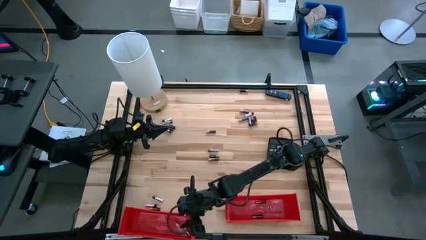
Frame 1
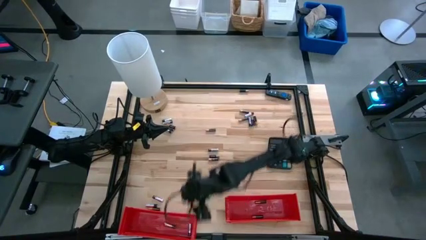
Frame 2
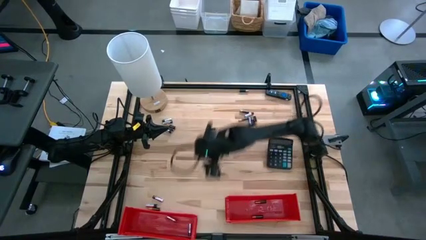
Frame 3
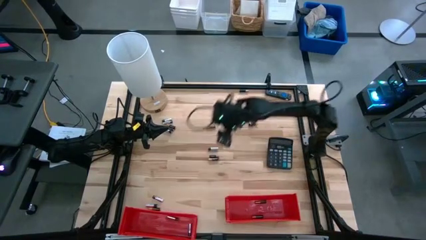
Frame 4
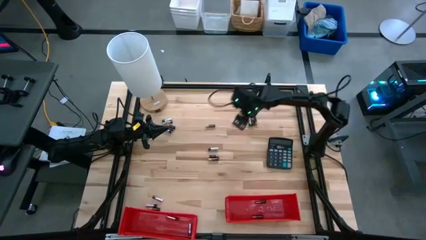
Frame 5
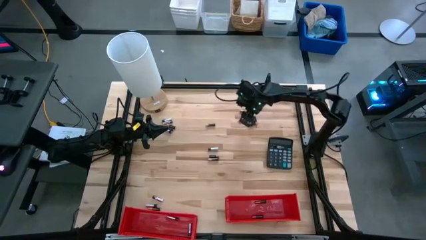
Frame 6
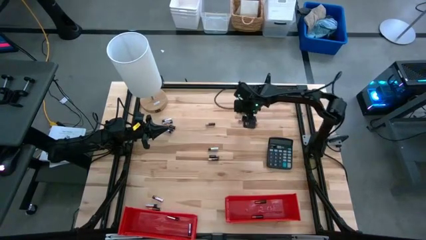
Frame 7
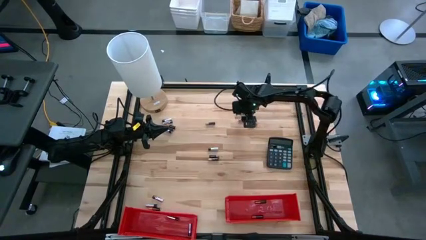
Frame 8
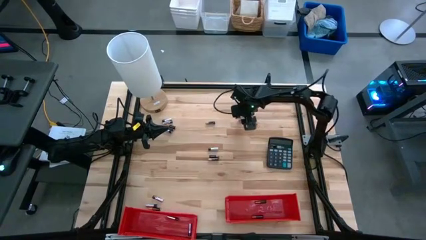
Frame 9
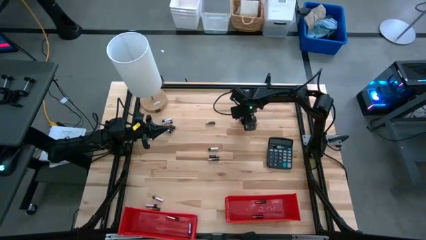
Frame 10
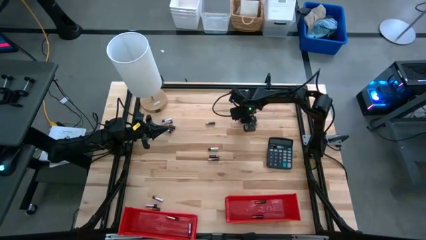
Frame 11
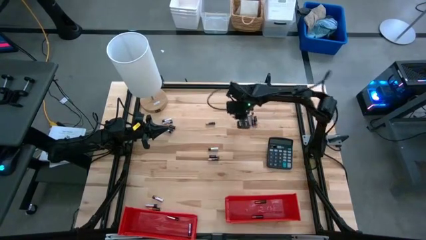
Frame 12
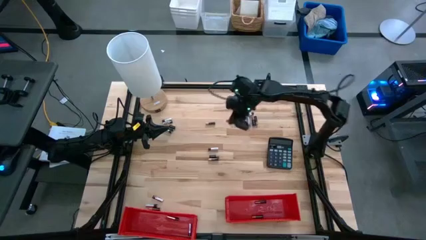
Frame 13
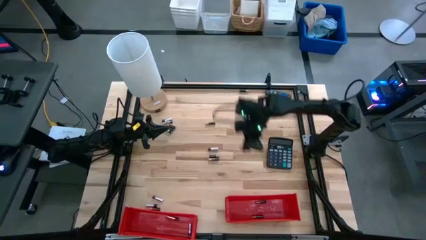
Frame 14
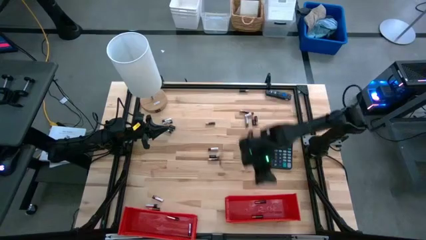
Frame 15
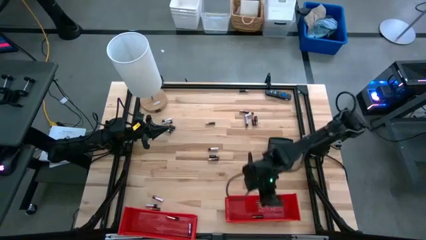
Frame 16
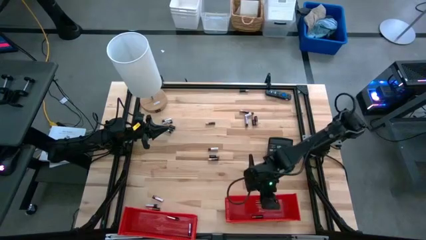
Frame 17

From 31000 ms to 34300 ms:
Task: Sort batteries
Put the black-brown battery into the right red bin

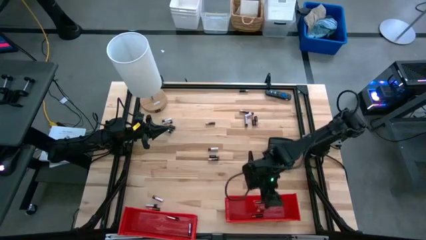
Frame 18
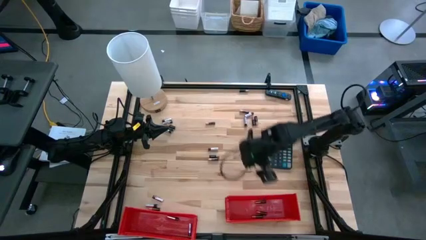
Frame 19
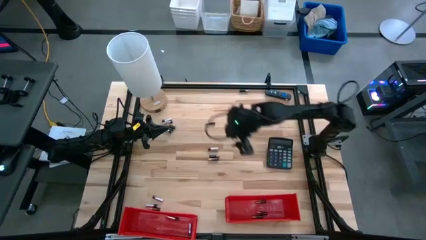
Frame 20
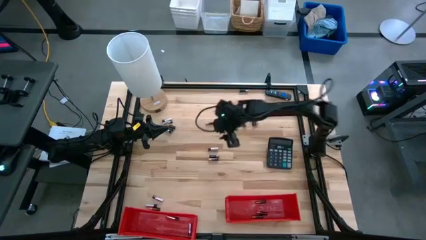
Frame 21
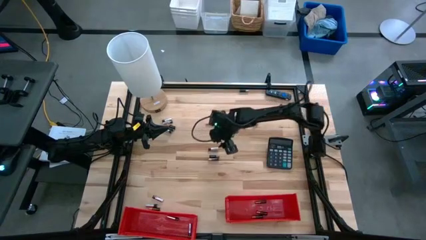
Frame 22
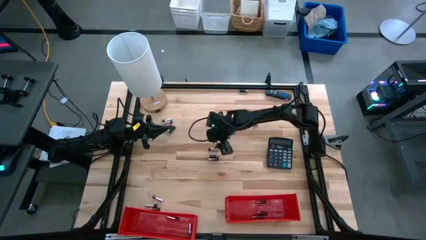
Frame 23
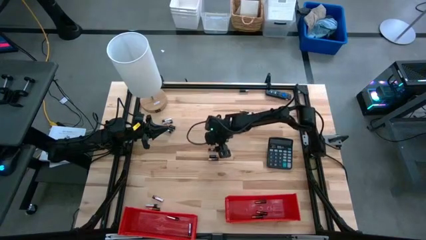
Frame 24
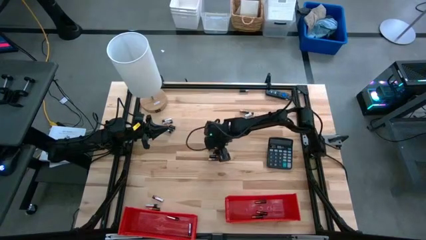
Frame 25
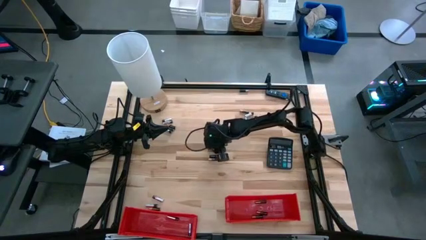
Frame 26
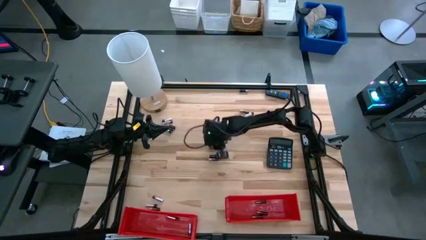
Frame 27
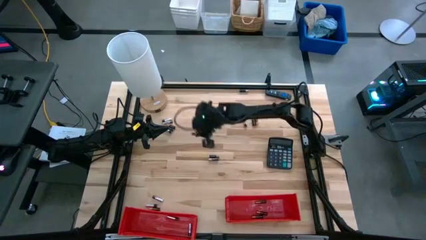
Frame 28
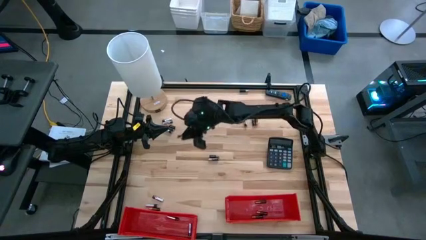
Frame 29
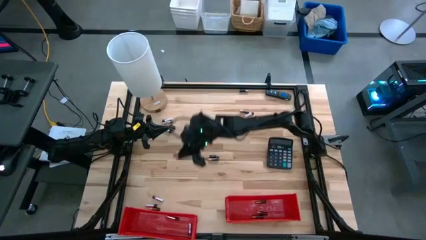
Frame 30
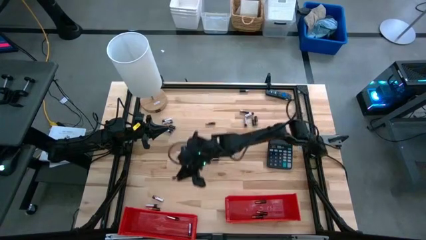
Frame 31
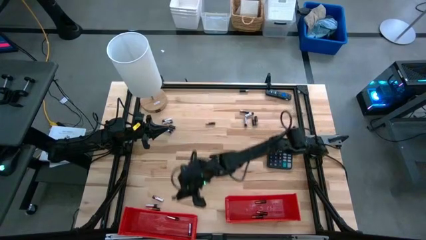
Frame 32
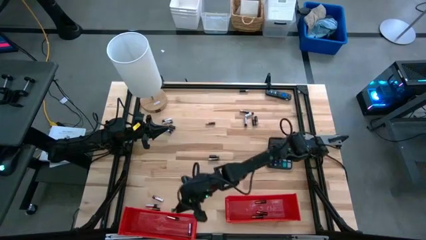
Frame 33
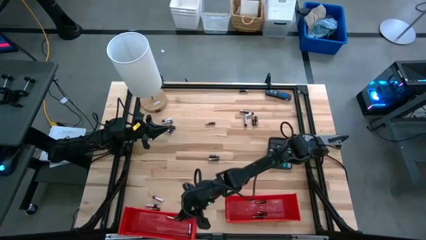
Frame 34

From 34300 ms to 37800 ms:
Put the silver battery into the left red bin

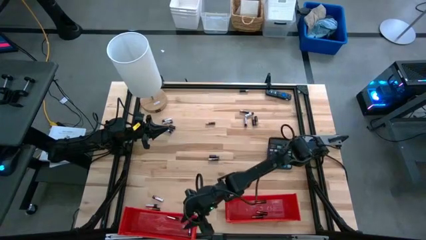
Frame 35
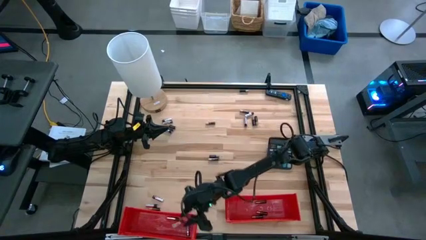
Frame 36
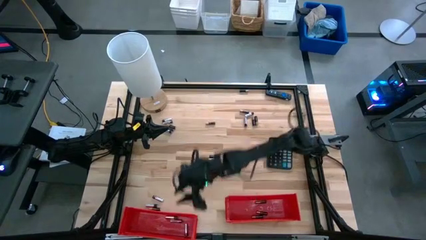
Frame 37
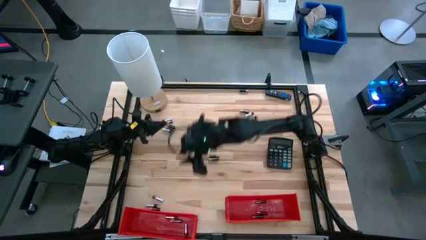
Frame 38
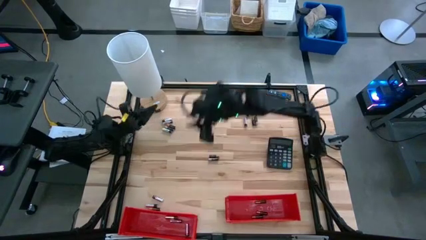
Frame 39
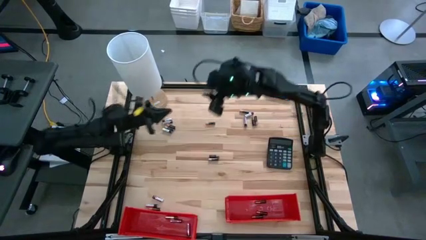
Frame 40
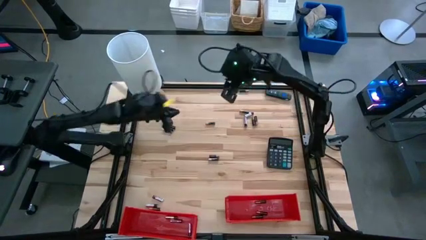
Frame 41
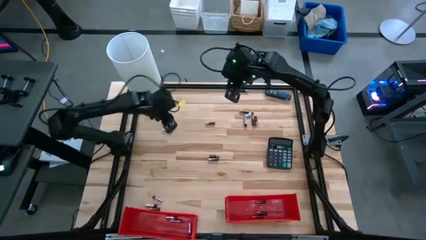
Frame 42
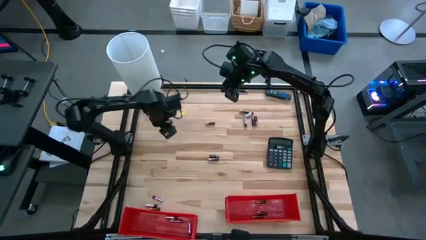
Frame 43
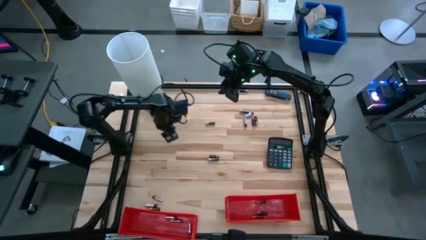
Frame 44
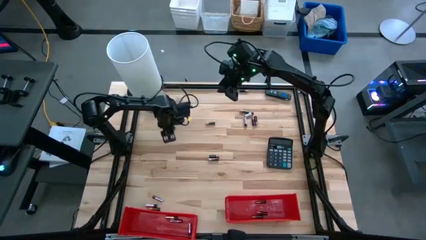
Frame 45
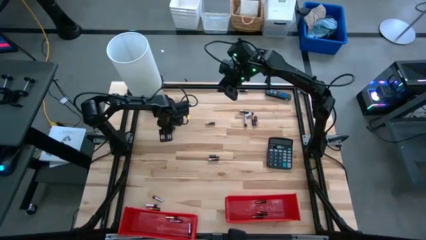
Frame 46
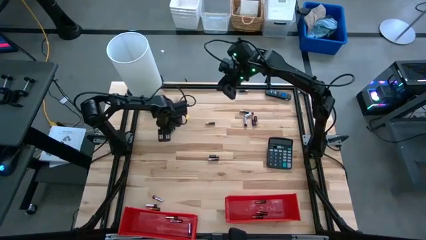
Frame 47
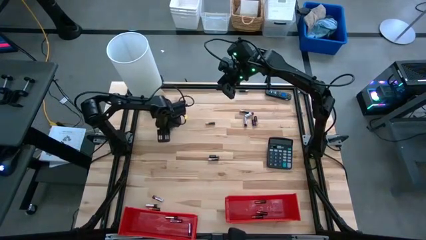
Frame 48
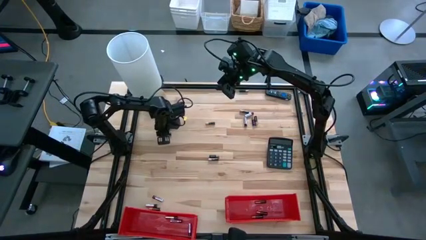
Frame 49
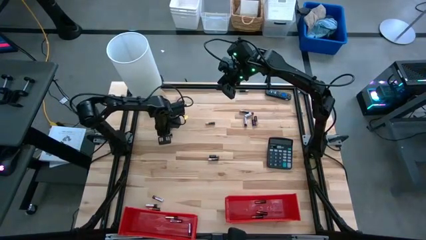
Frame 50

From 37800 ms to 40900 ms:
Put the silver battery into the left red bin

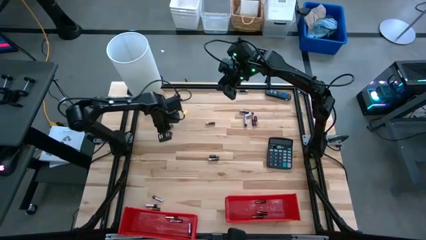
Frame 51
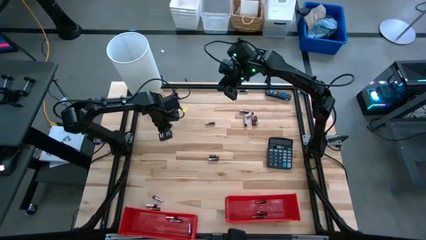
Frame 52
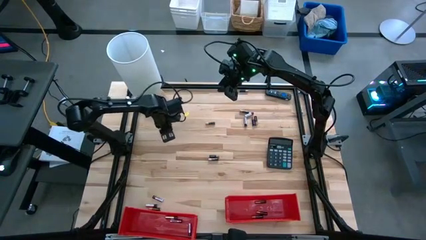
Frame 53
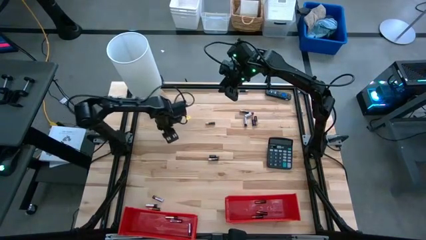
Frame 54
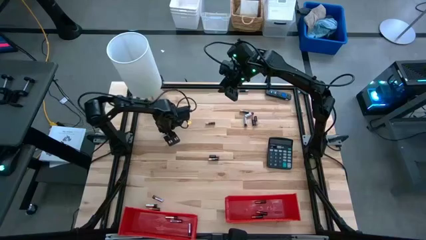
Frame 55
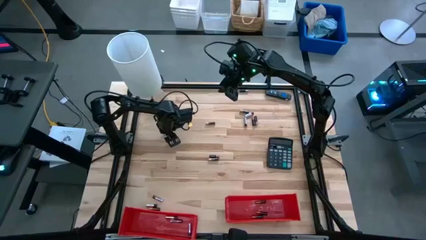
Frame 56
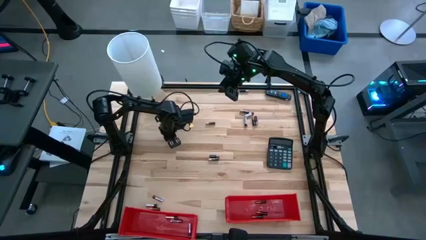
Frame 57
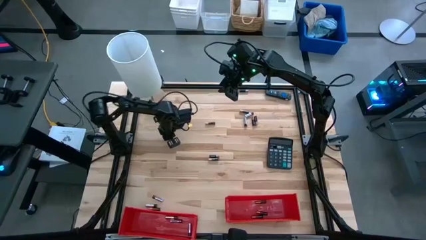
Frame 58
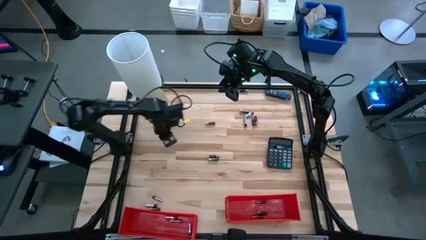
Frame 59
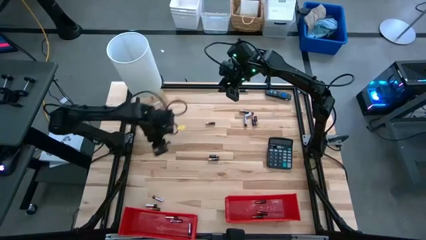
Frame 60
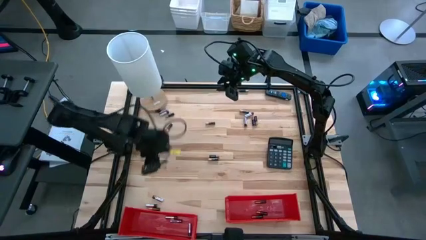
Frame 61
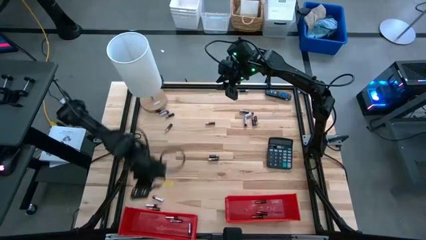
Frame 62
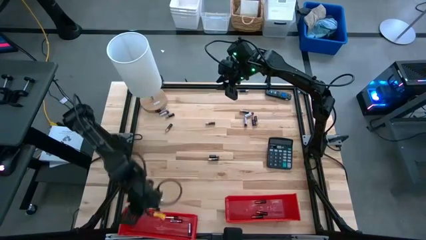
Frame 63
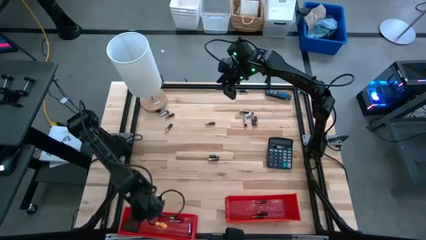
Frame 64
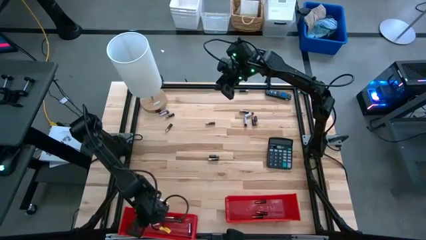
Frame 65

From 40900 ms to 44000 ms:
Put the silver battery into the left red bin

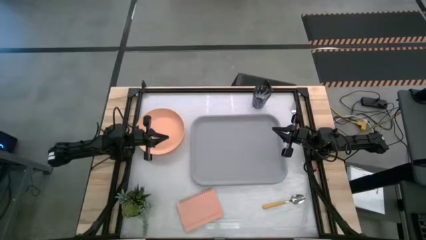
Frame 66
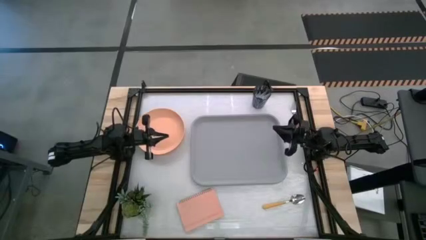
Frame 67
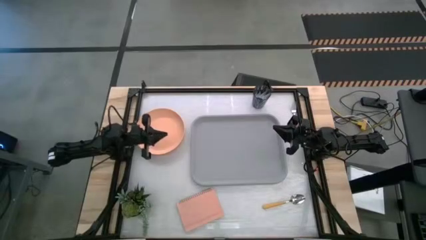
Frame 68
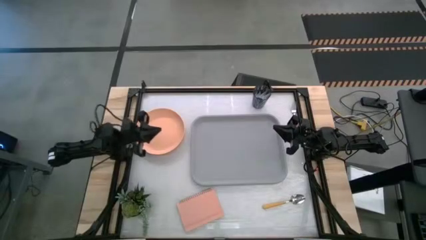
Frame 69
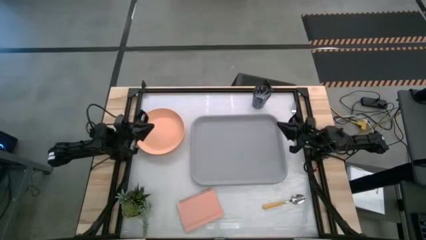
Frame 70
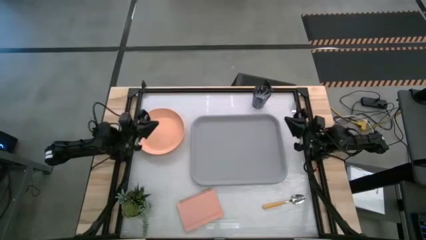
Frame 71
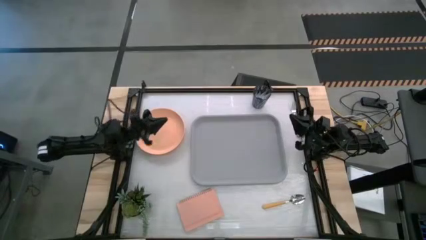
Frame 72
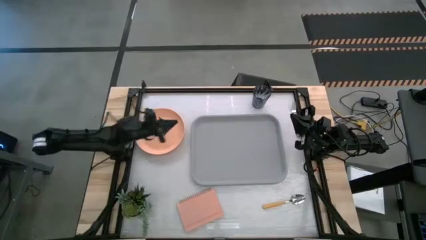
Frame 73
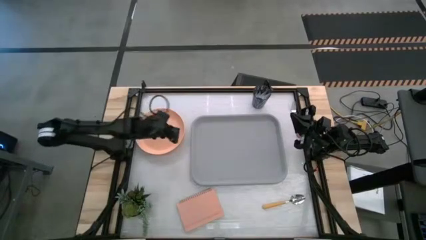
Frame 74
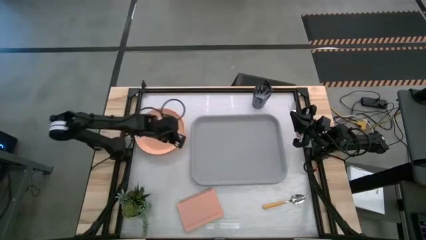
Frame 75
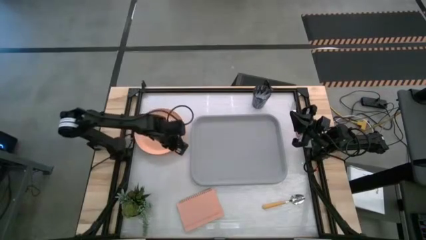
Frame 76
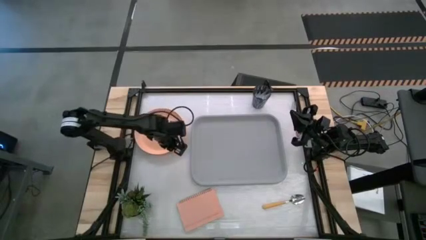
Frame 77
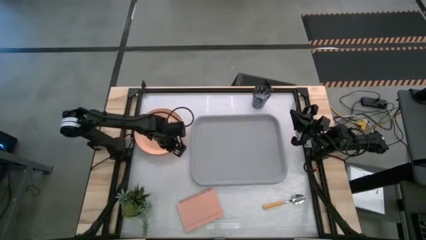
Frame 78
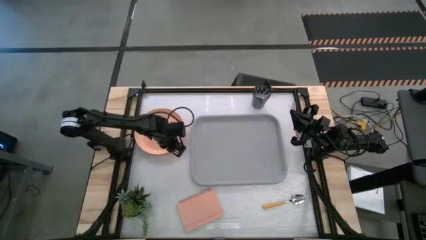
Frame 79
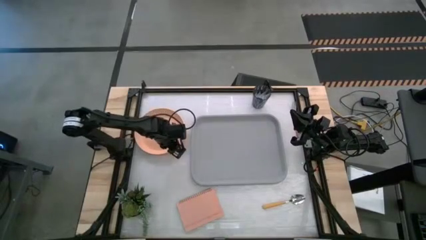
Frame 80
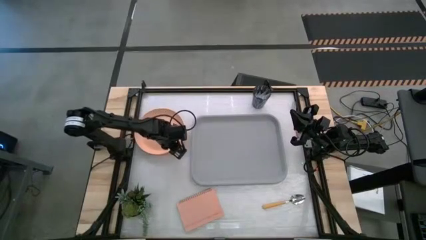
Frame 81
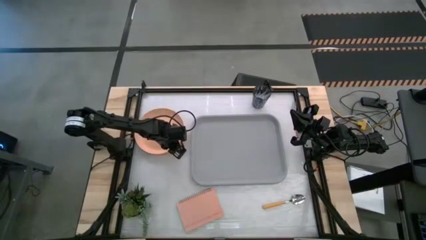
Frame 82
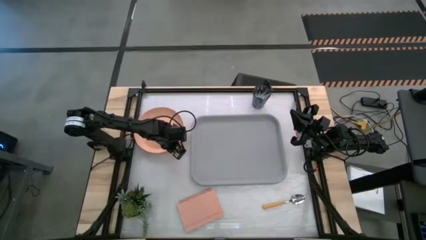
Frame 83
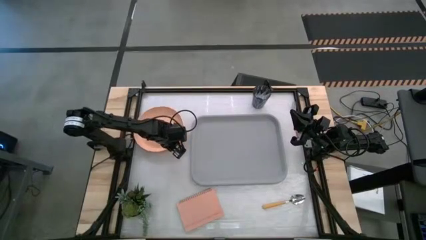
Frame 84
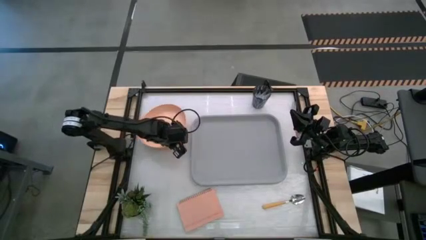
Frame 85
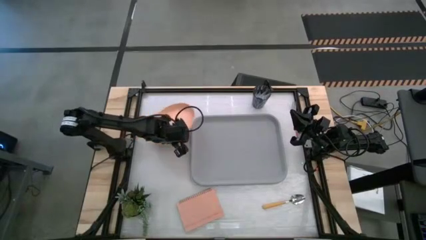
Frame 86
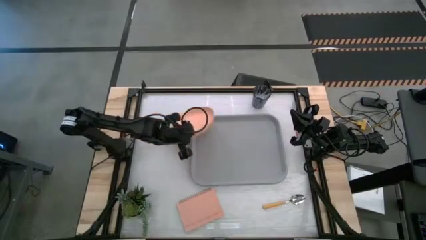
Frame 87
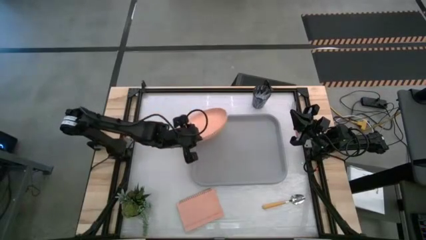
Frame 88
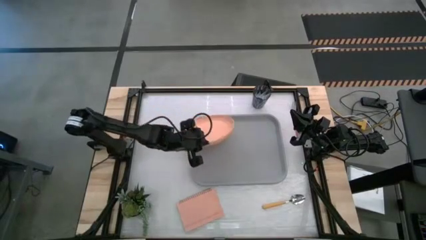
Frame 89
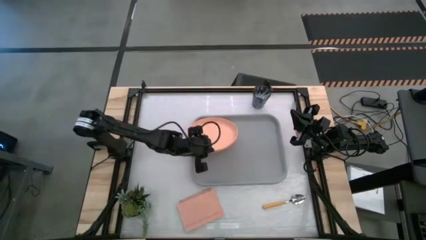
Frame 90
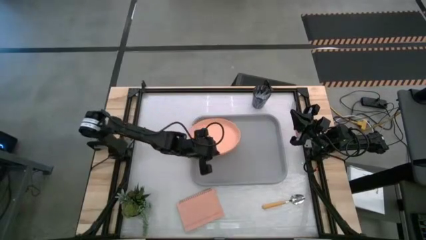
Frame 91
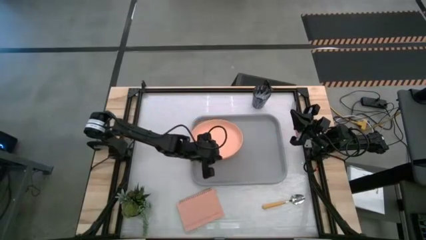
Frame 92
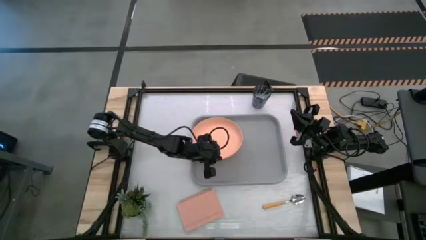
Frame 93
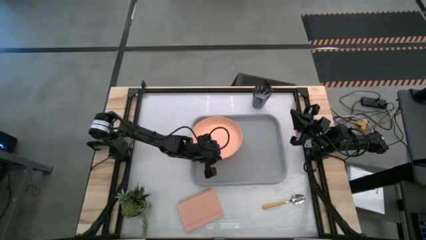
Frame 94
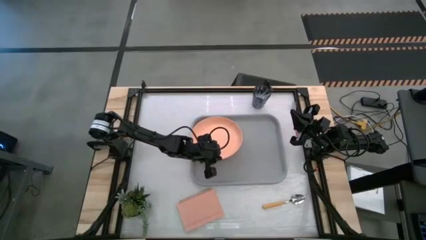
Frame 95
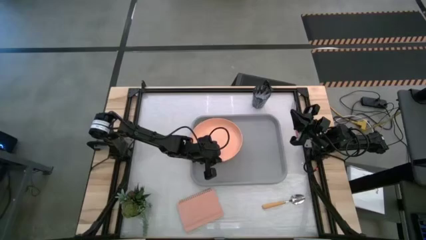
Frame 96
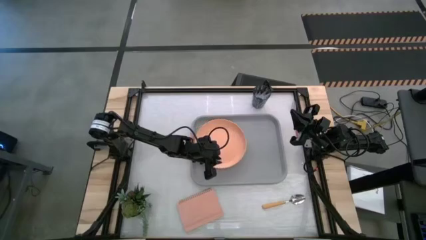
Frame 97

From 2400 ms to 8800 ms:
Task: Pick and place plate/cup/fork/spoon on tray
Put the orange plate on the top left side of the gray serving tray
